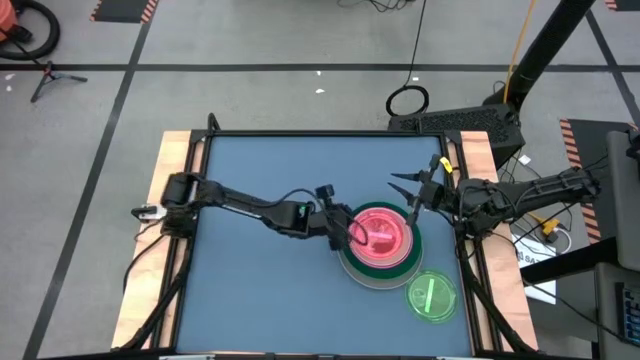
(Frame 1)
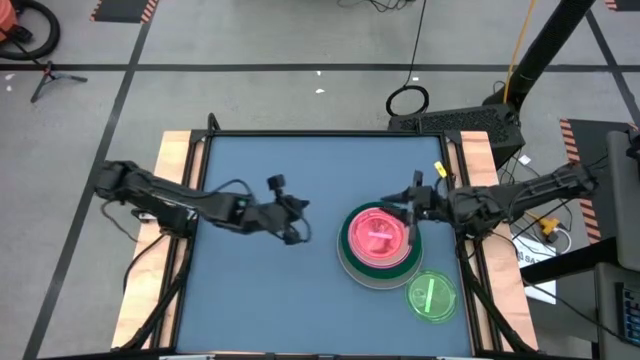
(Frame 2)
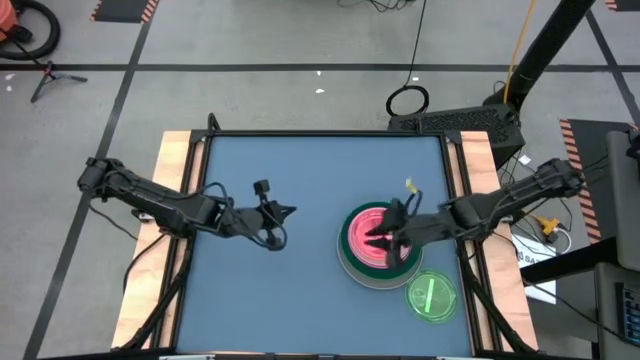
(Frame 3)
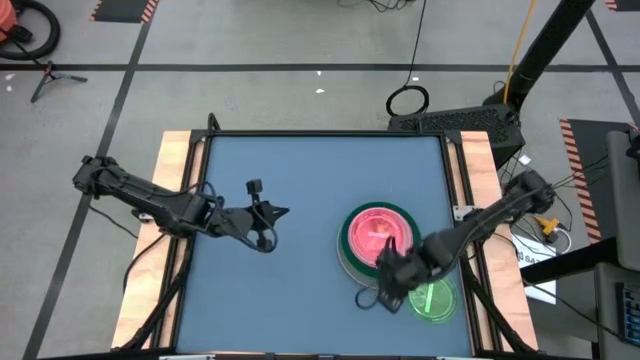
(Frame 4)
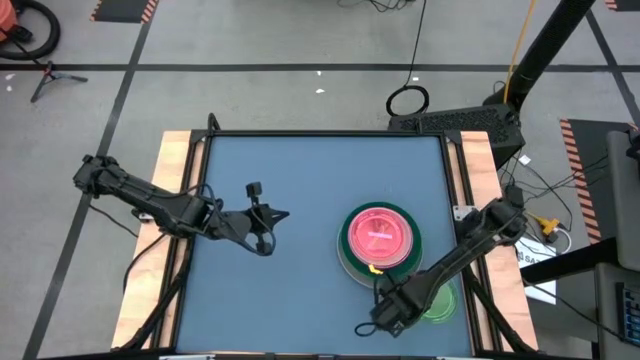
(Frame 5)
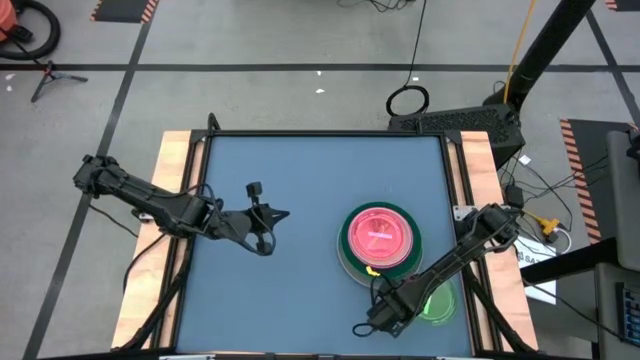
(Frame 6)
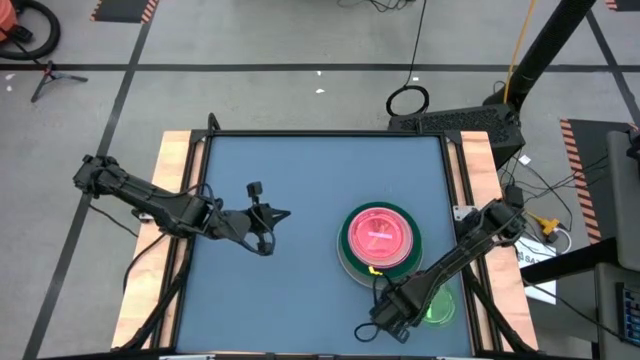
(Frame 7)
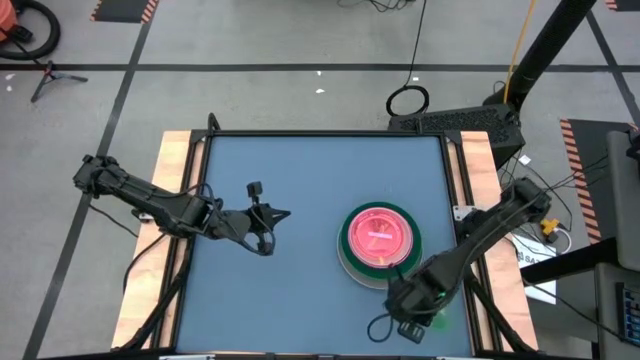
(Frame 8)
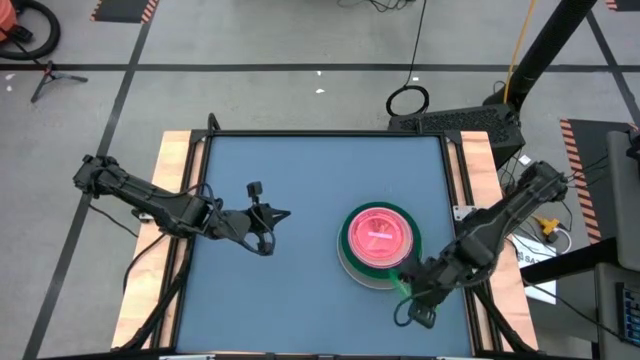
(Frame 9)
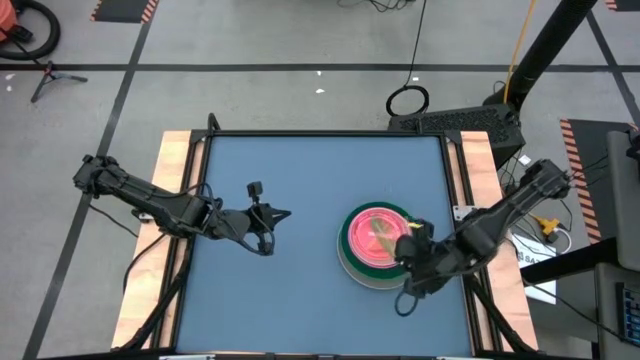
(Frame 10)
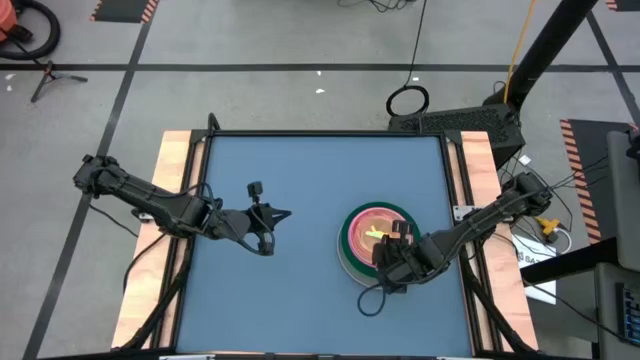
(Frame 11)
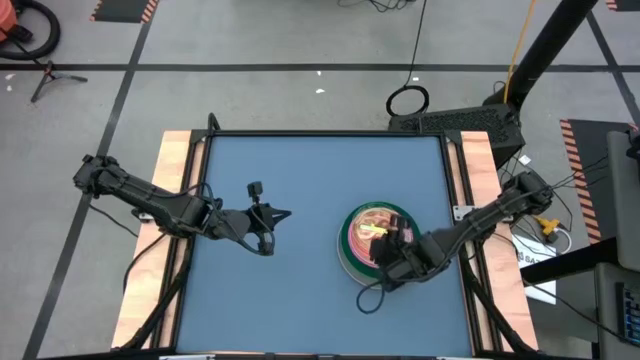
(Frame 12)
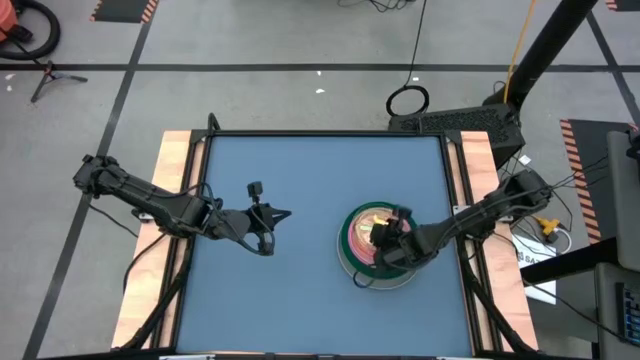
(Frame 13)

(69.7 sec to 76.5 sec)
Task: Stack plastic plates
Stack the light green plate on top of the light pink plate

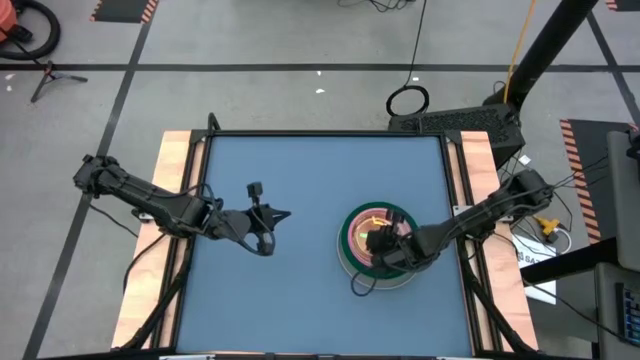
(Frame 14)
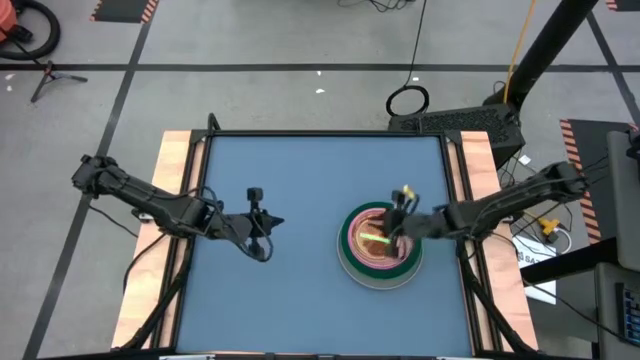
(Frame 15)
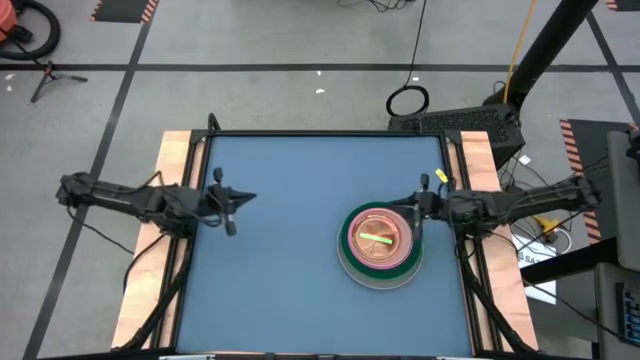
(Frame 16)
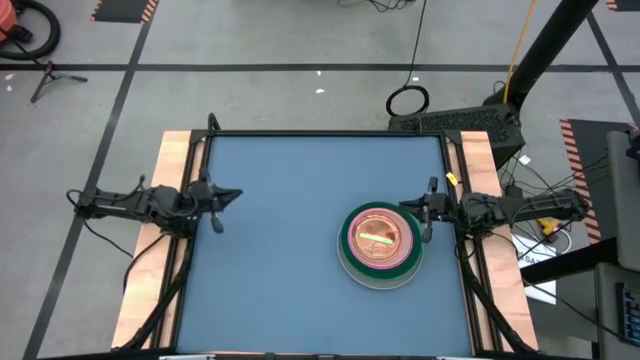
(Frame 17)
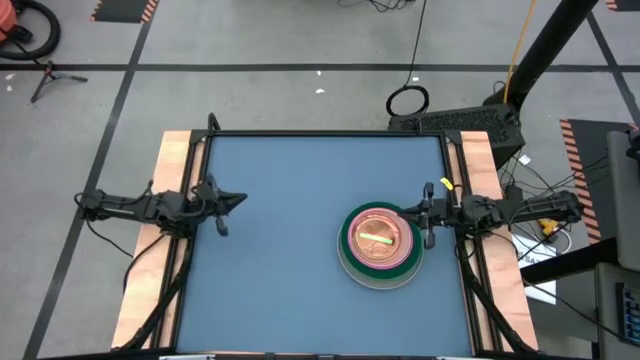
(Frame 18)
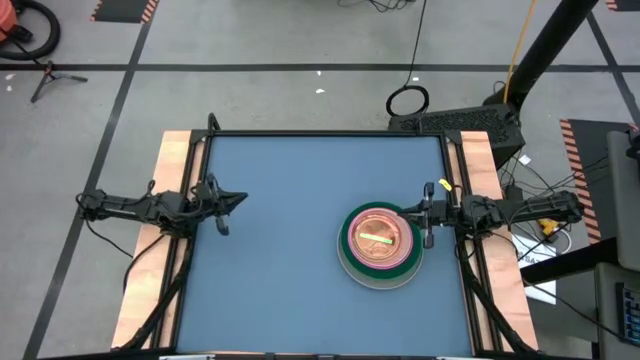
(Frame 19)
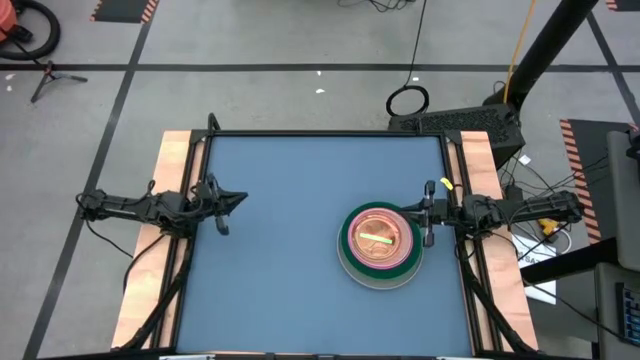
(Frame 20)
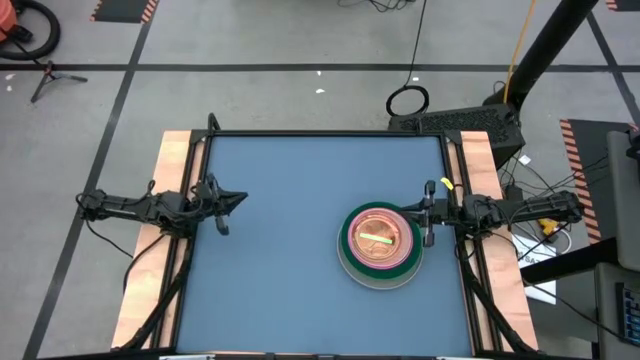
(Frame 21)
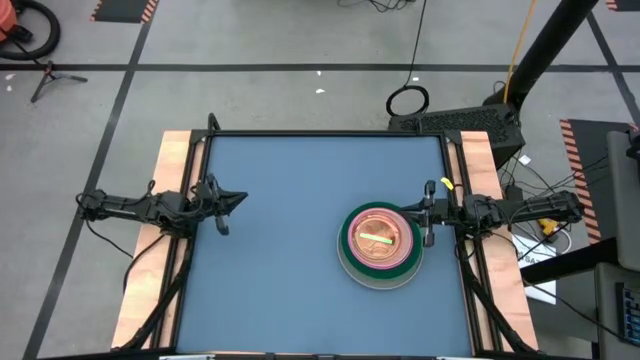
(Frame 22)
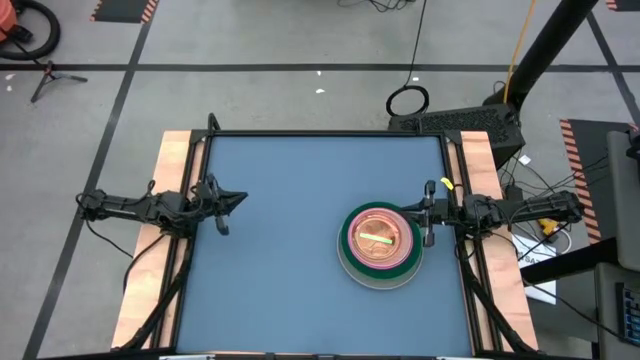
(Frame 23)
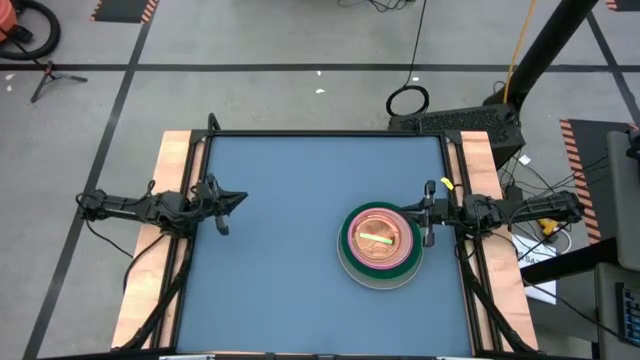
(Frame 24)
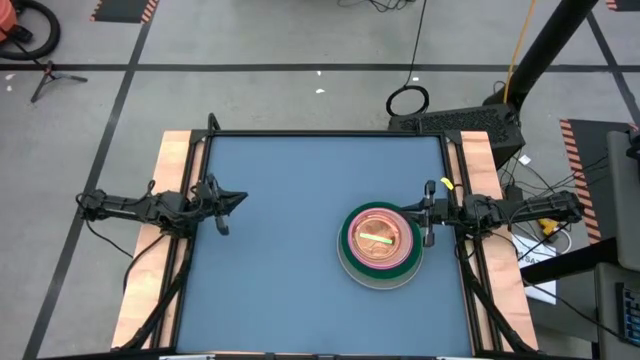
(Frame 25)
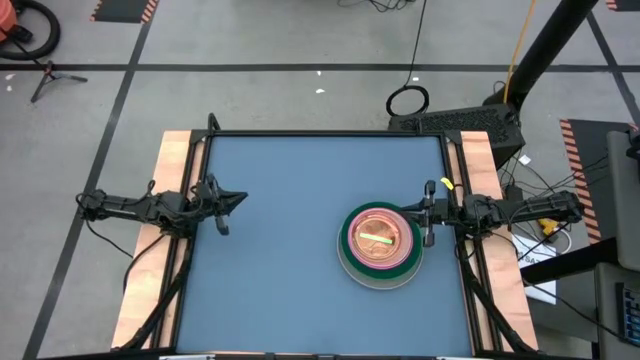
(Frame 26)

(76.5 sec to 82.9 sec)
Return to Home Position

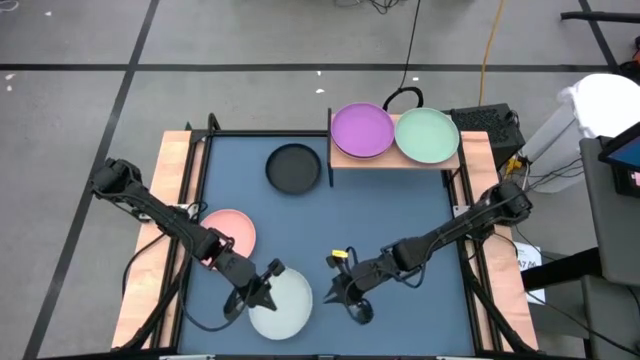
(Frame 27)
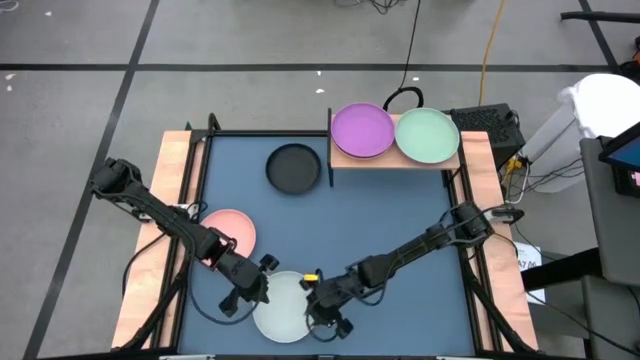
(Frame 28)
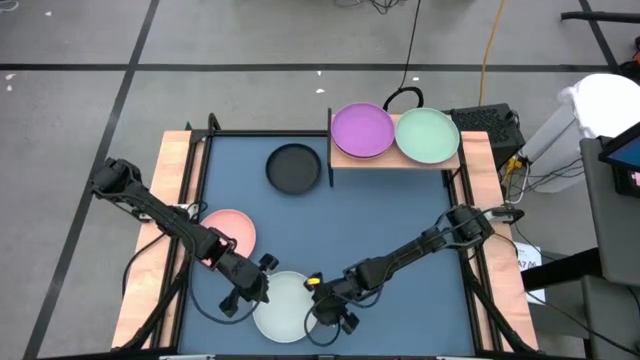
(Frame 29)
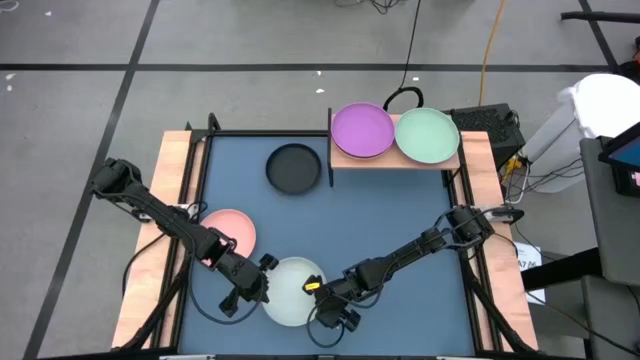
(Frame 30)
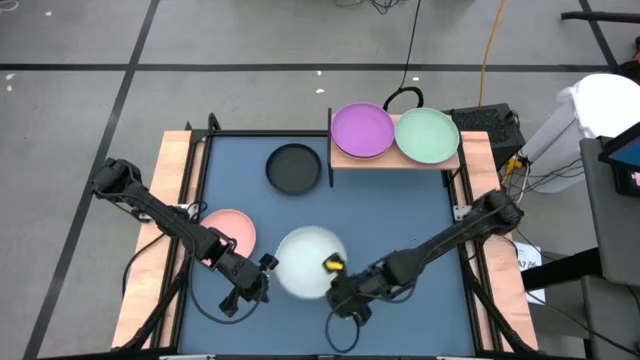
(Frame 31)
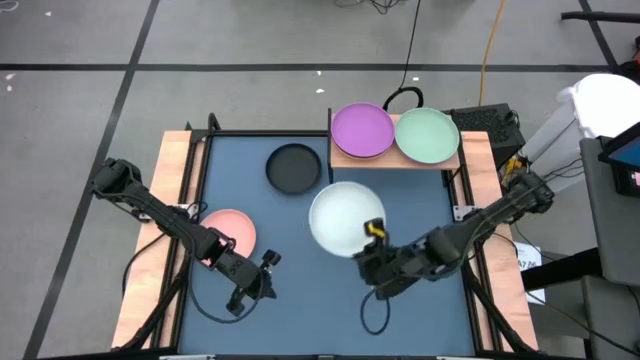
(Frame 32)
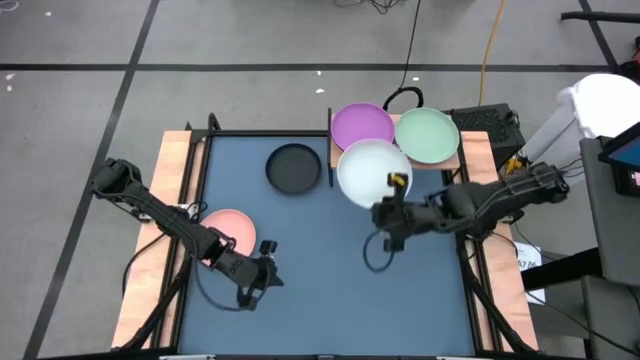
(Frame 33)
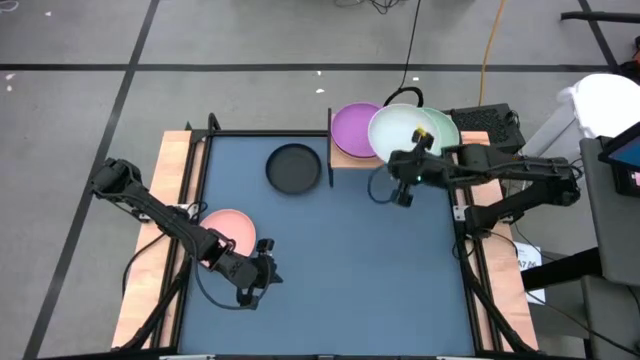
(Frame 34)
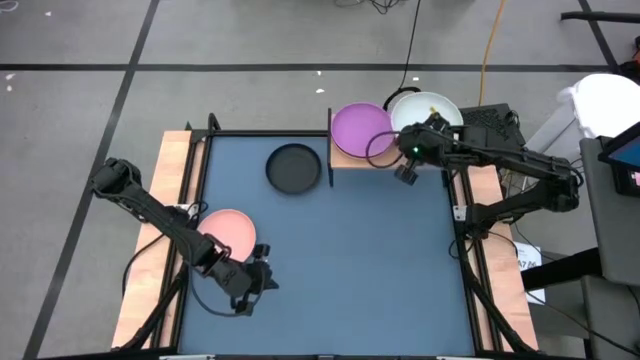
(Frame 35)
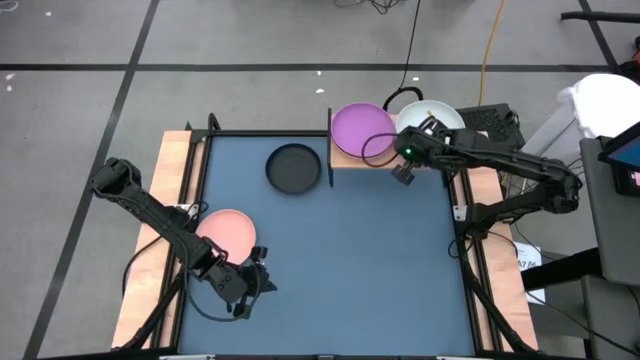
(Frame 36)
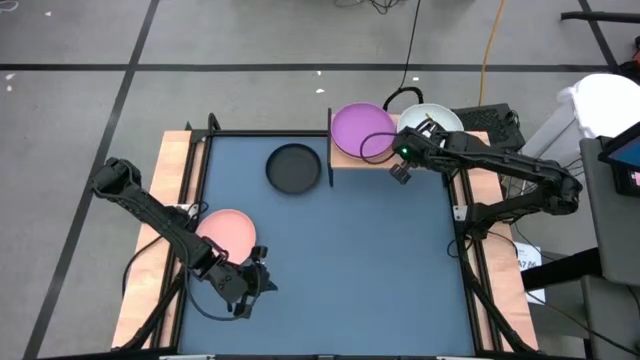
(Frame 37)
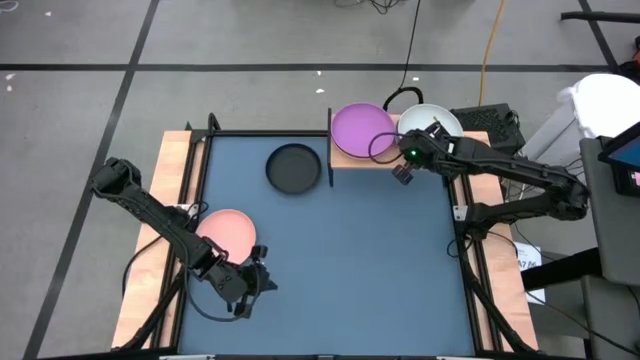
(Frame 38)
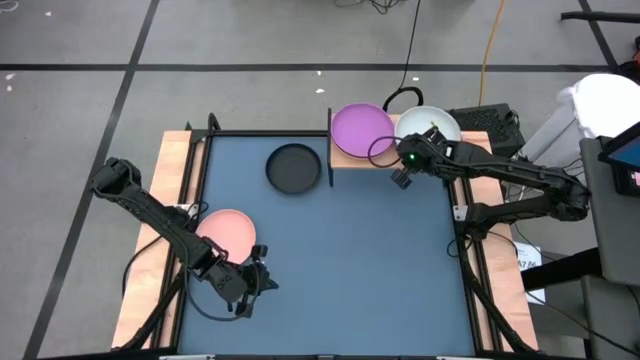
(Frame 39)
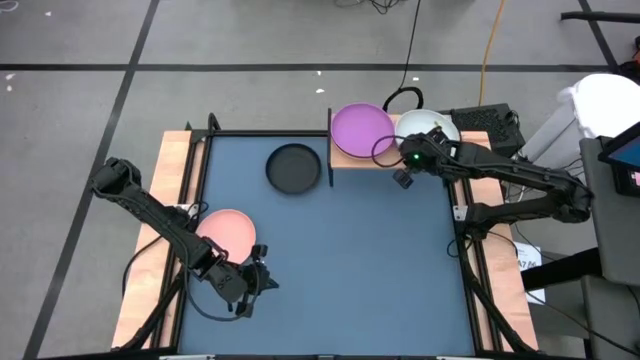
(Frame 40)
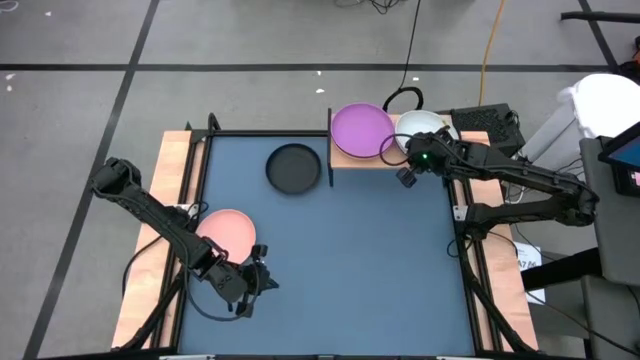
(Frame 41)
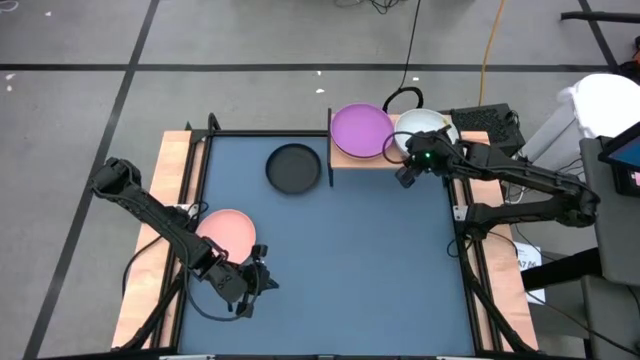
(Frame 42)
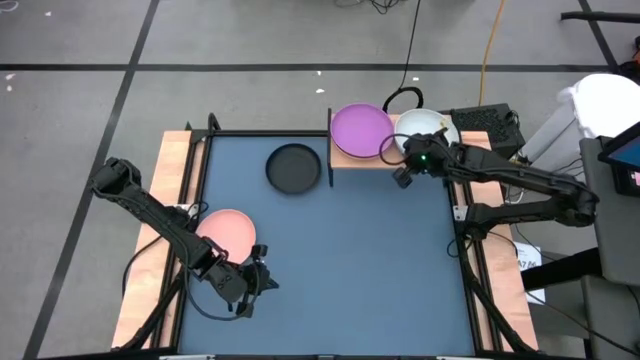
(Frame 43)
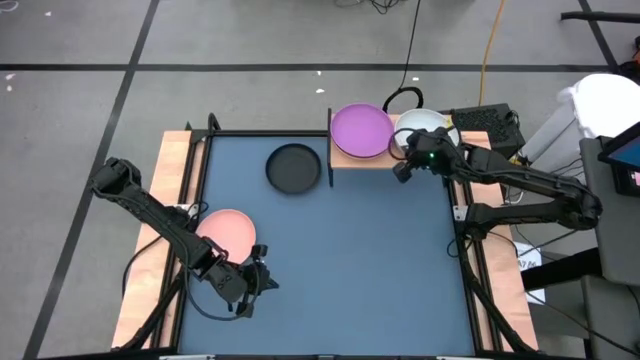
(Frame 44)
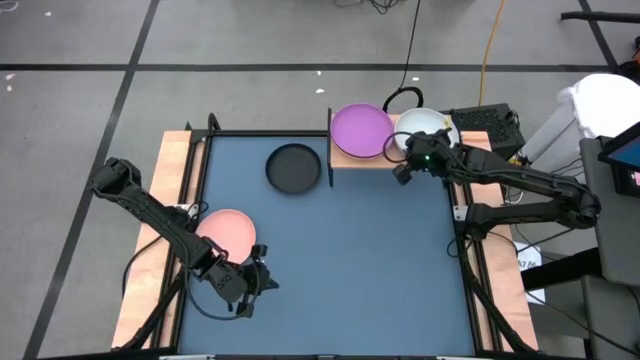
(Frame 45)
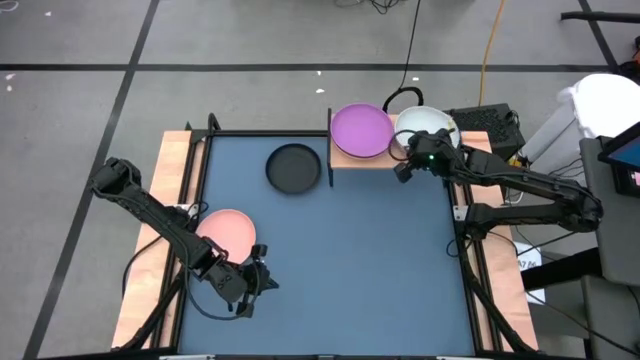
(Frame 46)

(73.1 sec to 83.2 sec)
Task: Place and stack plates onto a shelf
Stack the gray plate on top of the light green plate on the shelf
